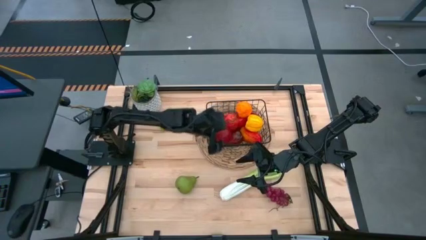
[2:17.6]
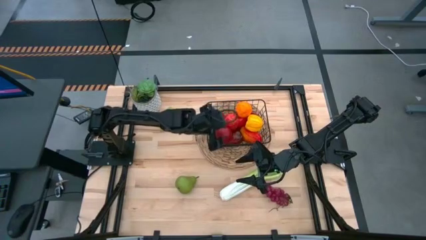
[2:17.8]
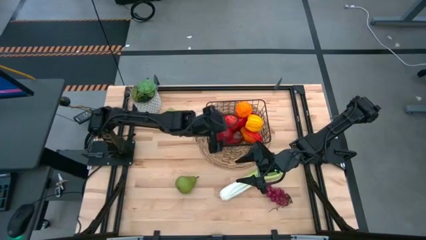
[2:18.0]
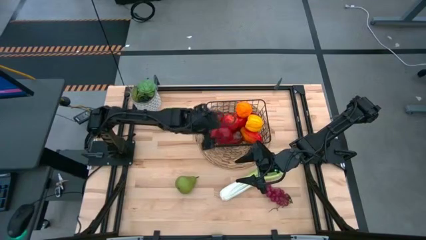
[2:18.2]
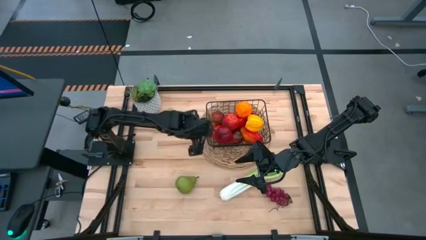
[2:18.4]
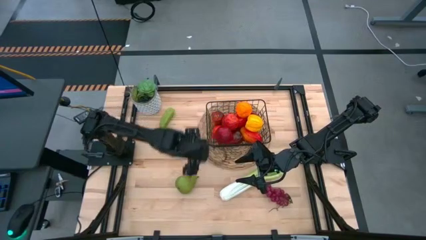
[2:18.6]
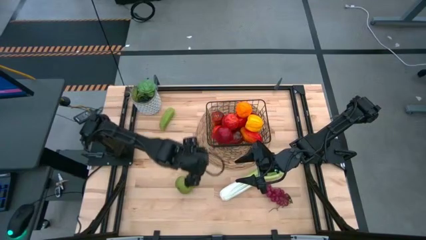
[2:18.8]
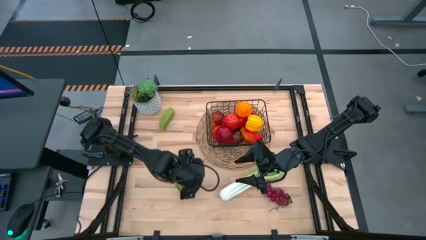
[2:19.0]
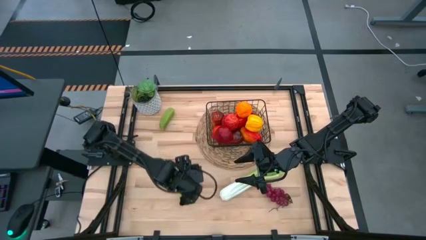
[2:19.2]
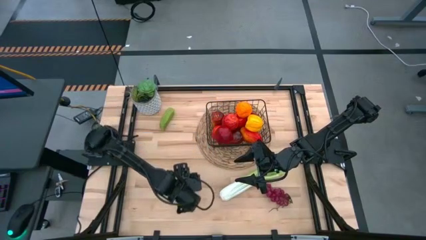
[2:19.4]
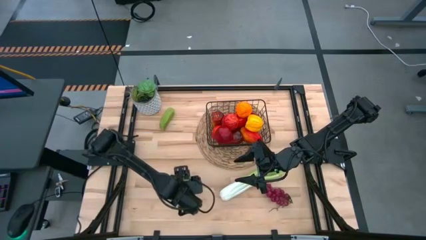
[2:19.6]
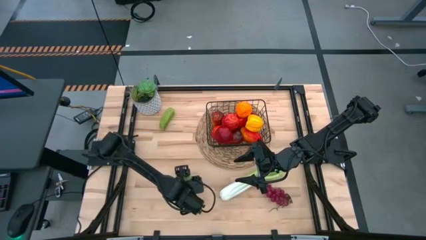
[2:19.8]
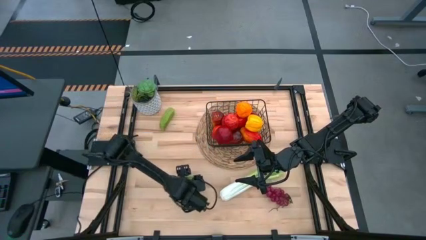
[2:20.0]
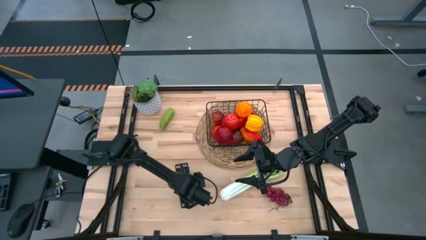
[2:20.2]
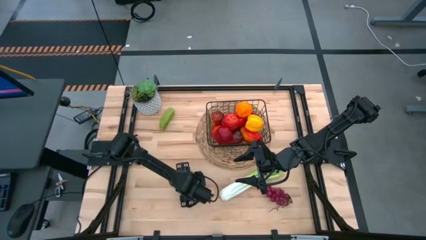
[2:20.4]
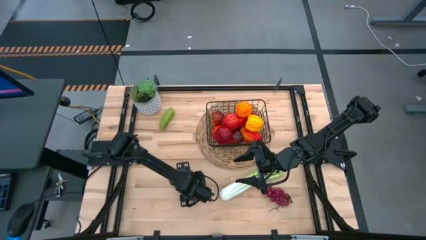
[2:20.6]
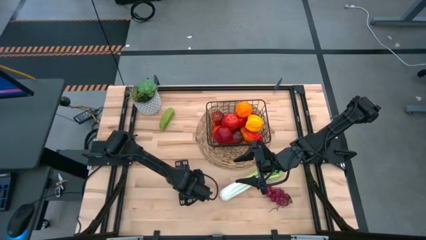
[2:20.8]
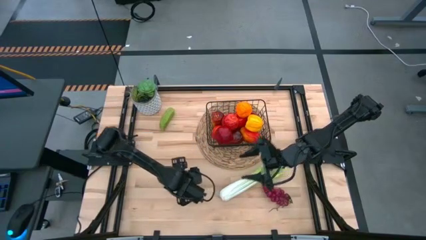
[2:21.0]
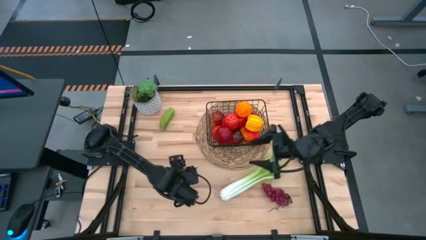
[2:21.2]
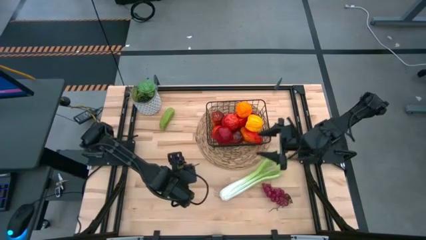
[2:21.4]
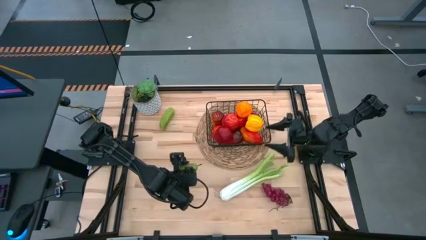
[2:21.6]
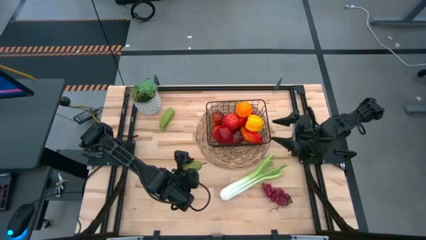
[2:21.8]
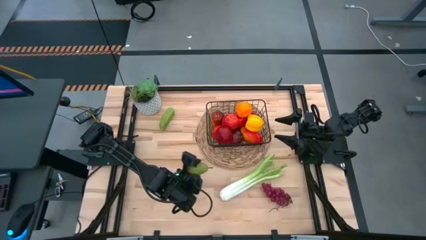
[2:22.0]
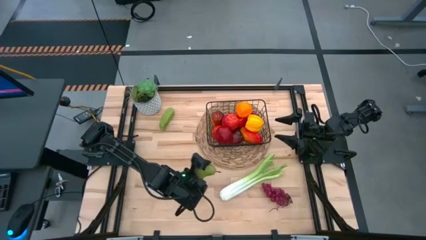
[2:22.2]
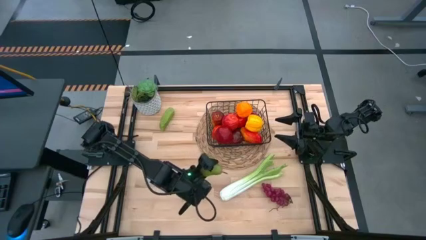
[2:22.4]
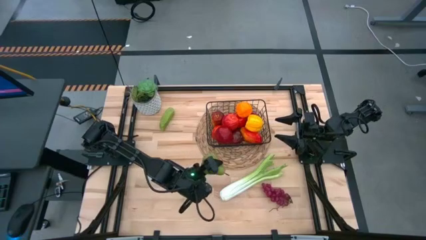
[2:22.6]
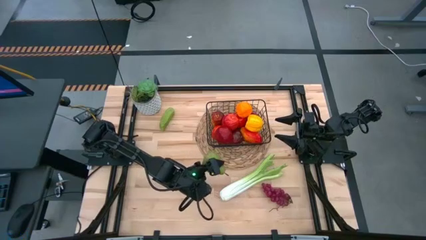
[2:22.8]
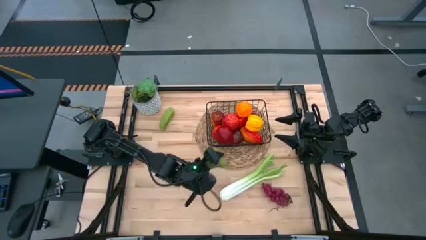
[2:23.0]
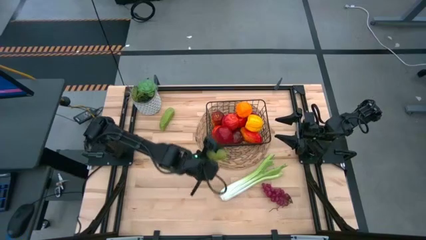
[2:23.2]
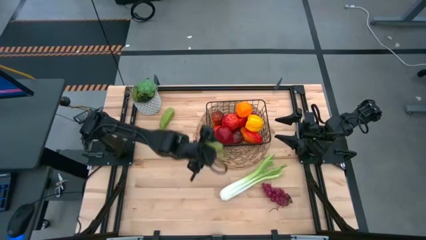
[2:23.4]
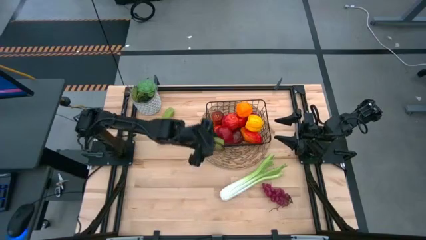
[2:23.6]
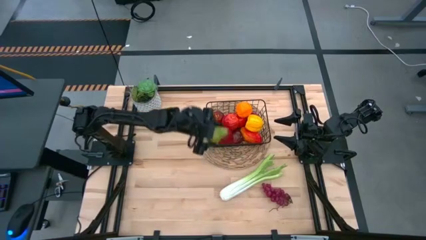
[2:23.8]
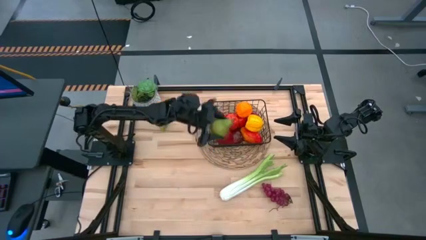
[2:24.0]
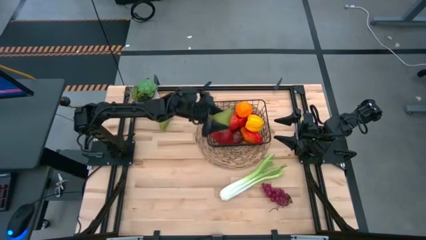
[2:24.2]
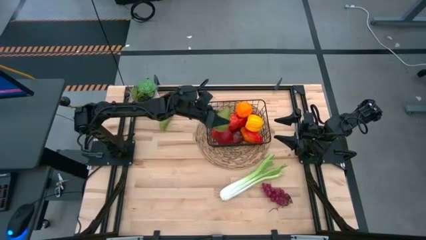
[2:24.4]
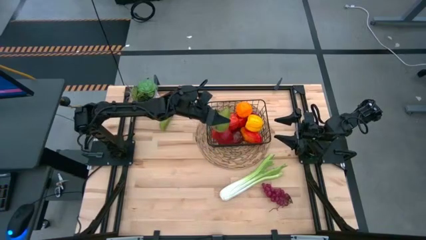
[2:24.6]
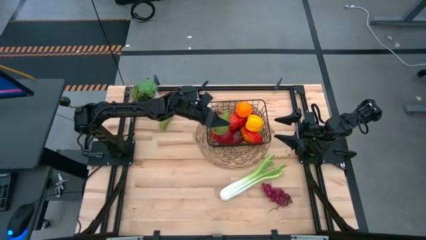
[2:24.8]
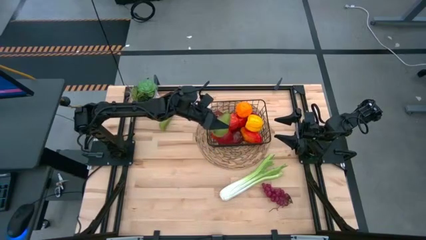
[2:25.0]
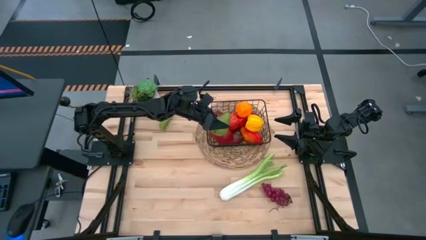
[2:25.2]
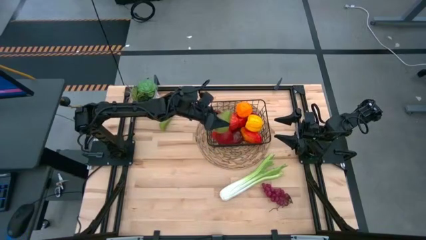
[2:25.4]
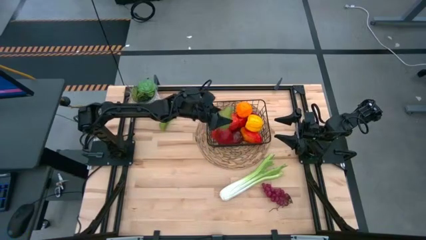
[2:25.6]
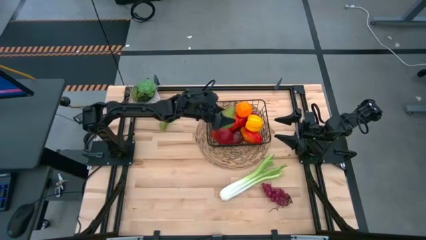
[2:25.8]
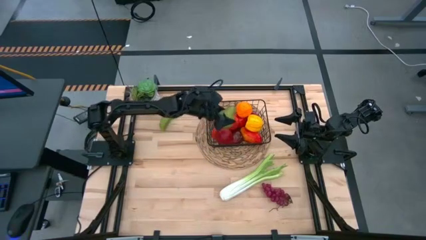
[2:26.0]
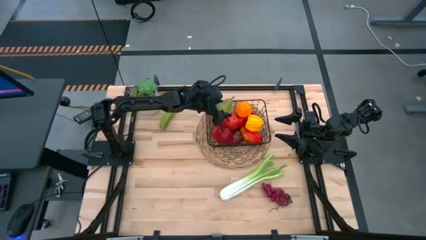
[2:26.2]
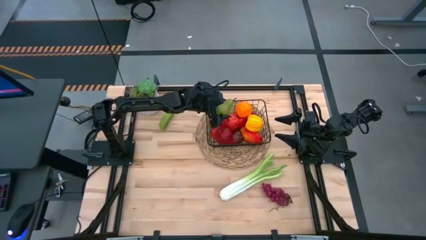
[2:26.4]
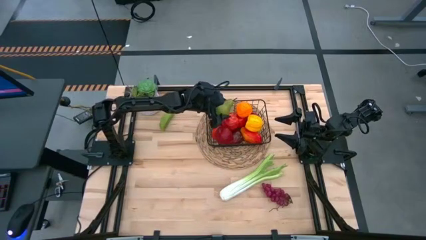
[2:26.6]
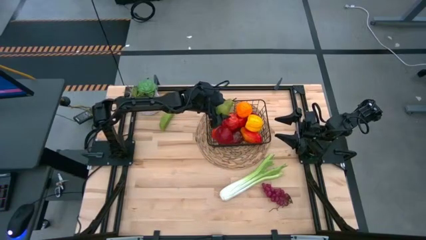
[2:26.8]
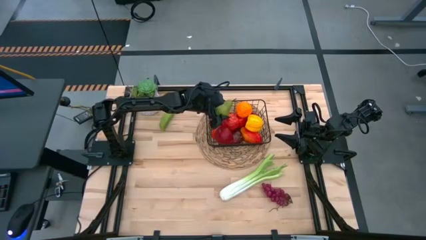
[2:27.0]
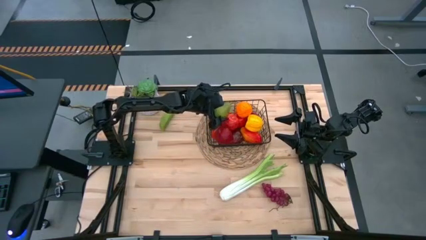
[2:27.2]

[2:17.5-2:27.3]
Task: Build produce basket
Put the green pear into the black wire basket

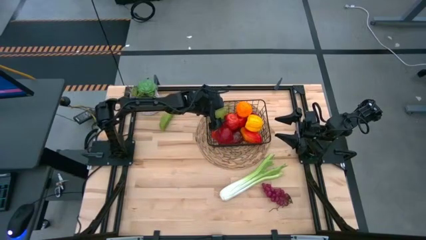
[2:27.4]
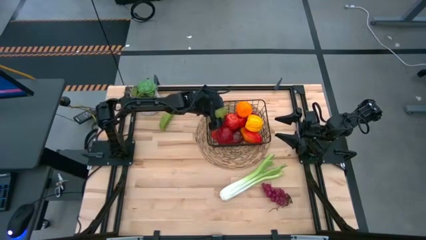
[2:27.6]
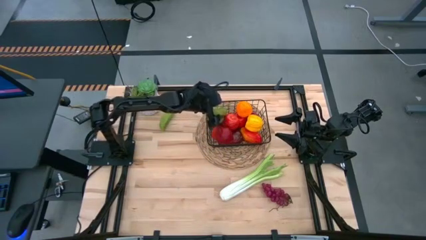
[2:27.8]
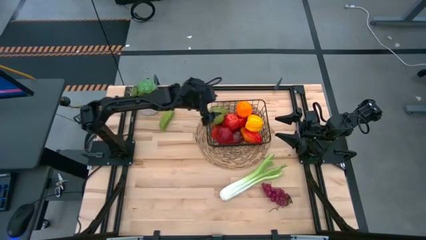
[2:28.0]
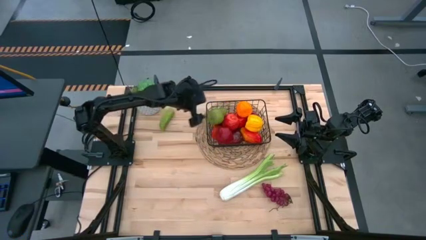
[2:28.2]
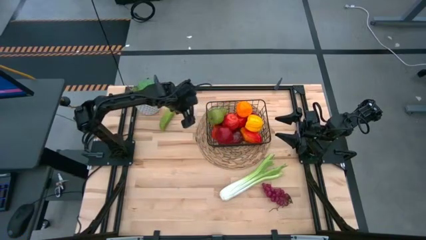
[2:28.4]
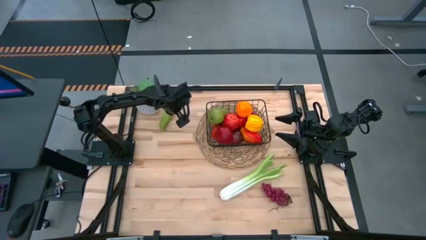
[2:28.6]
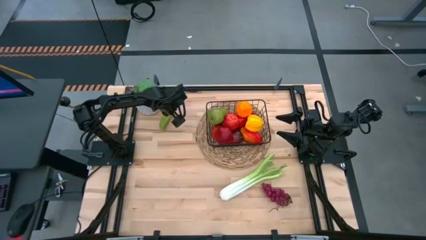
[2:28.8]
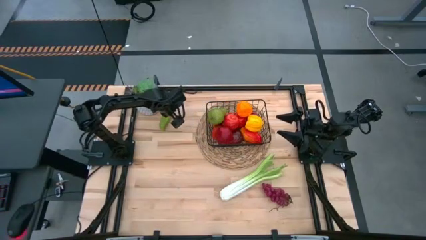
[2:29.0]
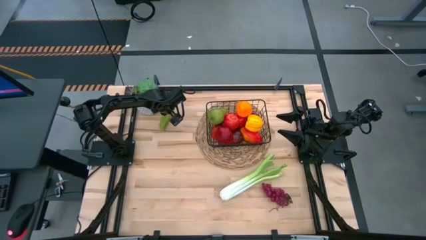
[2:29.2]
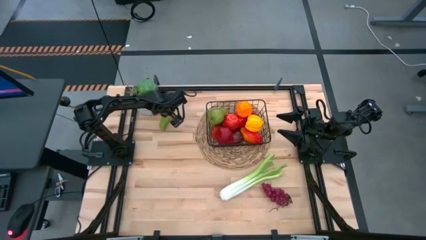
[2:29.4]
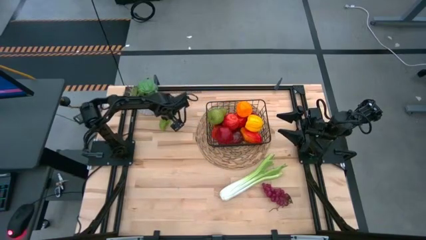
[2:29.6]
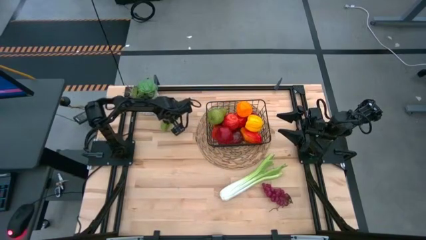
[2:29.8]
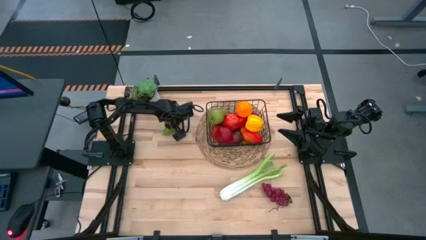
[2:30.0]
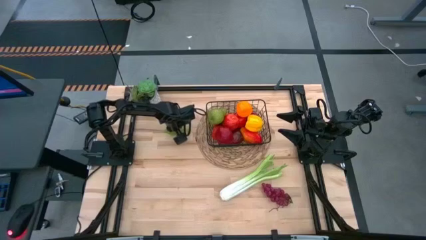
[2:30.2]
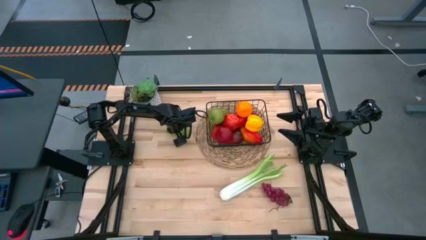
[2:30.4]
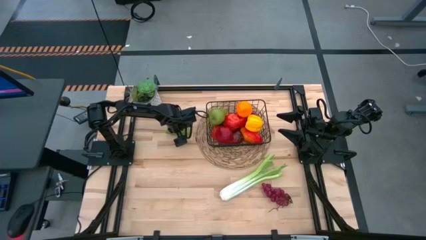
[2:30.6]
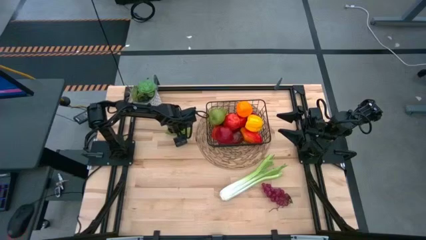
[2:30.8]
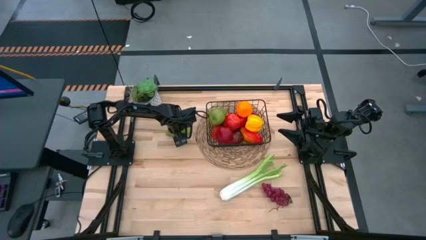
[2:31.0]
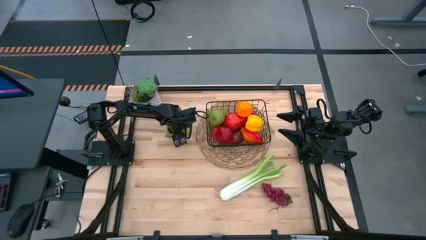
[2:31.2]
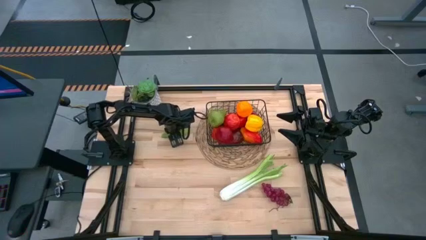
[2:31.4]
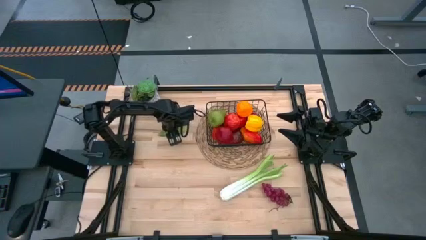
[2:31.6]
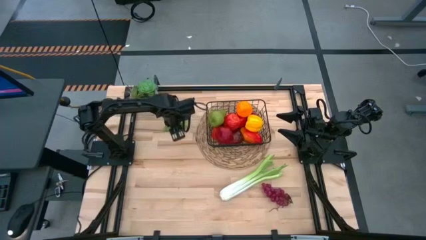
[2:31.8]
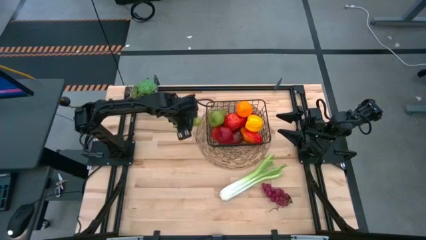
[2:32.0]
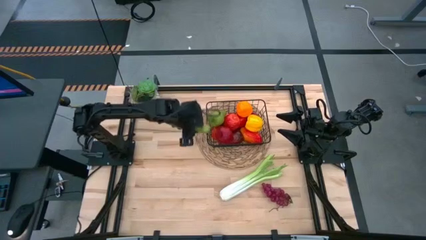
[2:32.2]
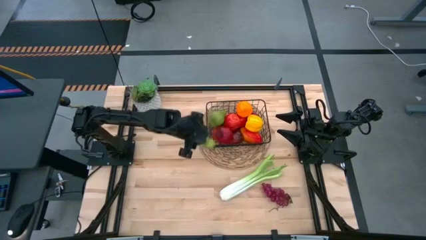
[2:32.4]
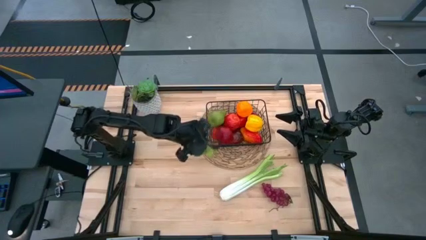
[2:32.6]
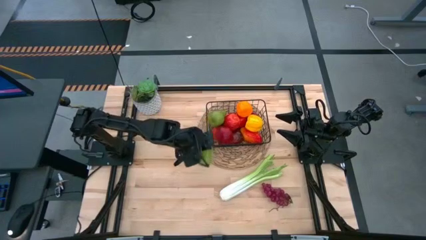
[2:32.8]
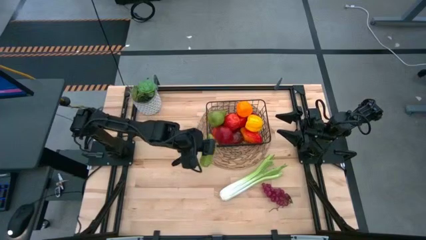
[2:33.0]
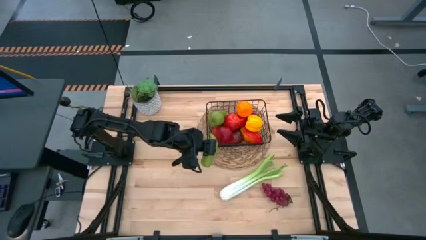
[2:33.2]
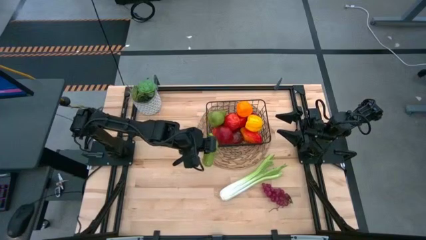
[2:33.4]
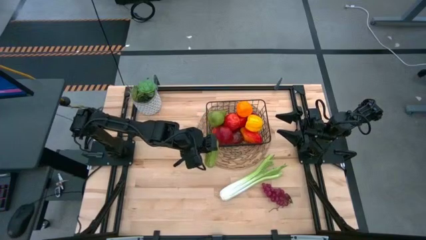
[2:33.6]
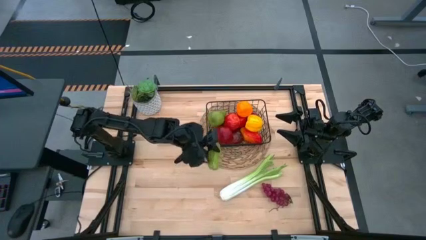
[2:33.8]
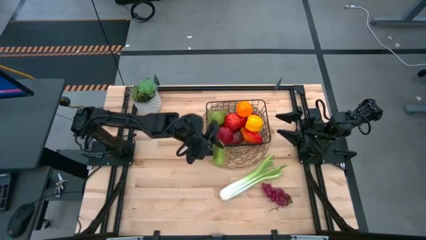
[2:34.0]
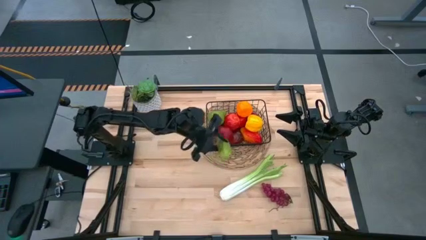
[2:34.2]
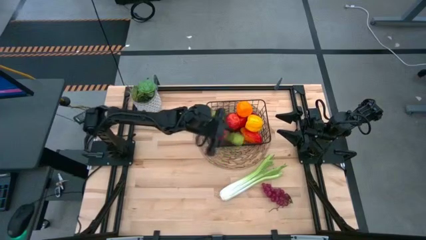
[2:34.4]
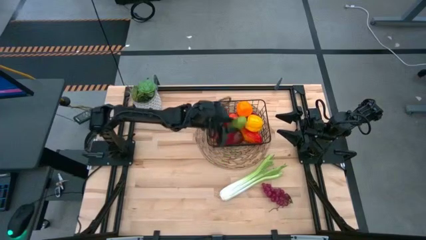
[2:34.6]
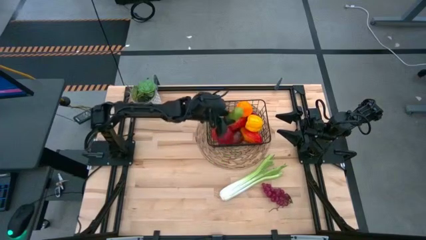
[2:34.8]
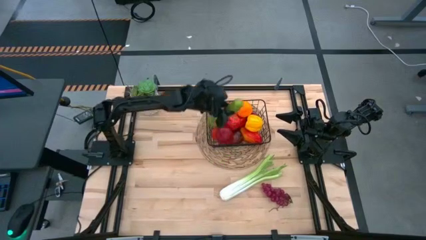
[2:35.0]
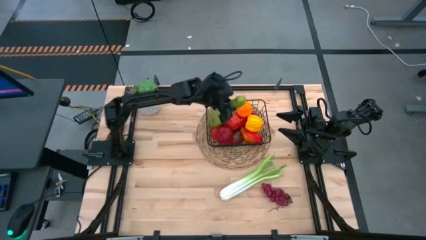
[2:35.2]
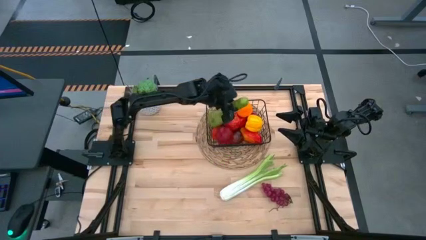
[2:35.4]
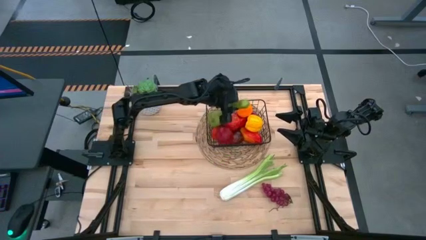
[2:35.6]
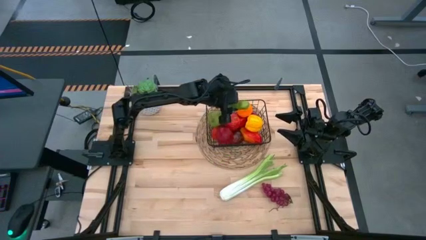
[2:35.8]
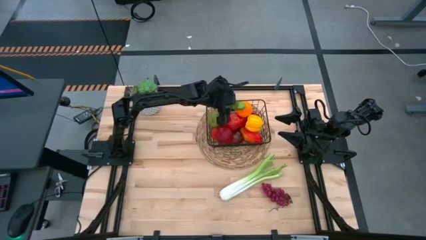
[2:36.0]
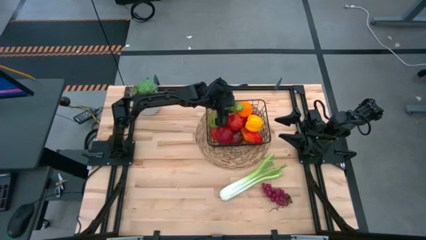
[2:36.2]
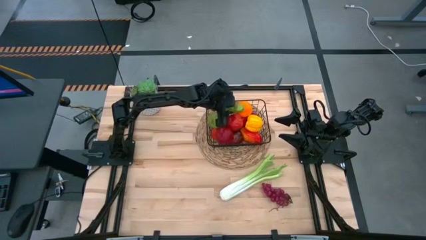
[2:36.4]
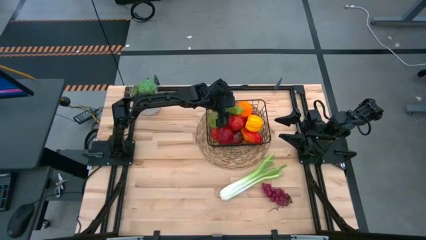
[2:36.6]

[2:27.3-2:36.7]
Put the green cucumber into the black wire basket
